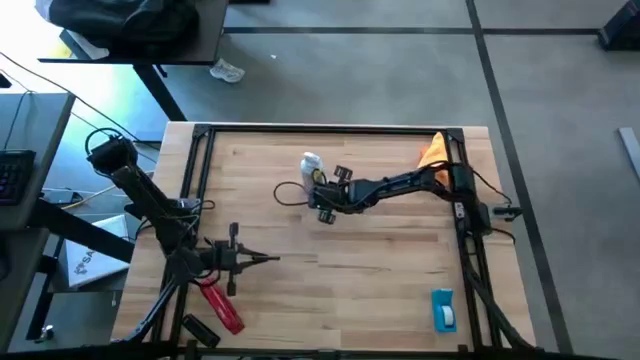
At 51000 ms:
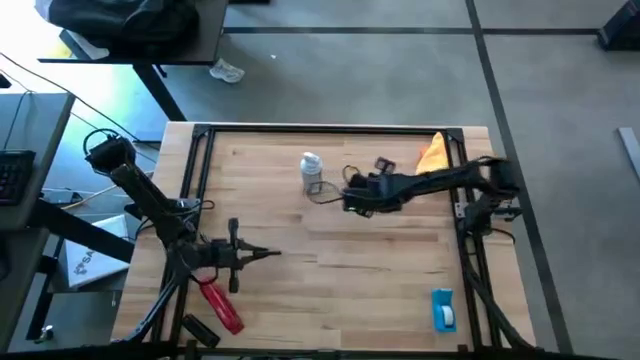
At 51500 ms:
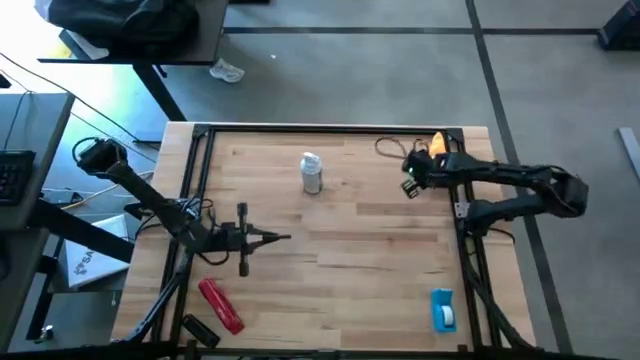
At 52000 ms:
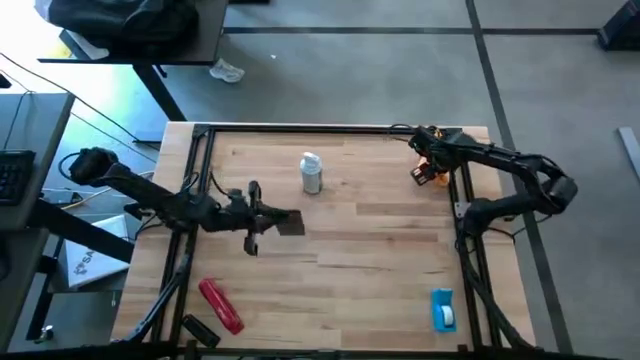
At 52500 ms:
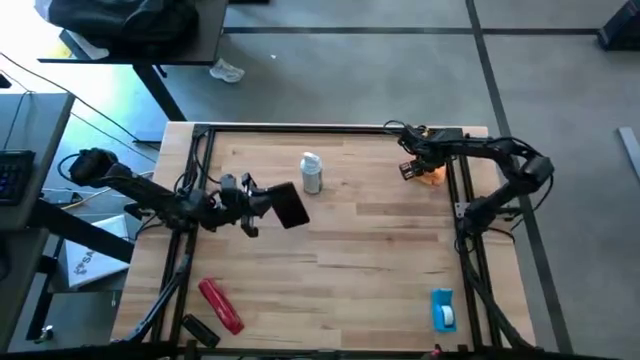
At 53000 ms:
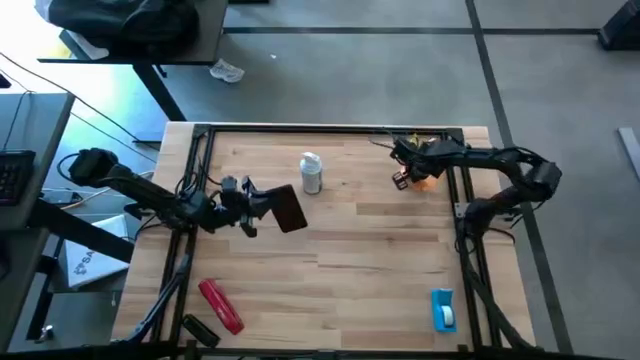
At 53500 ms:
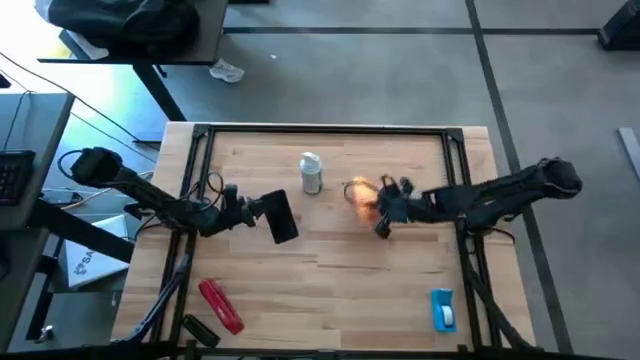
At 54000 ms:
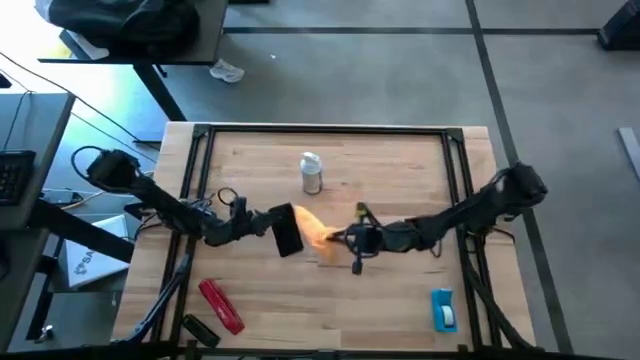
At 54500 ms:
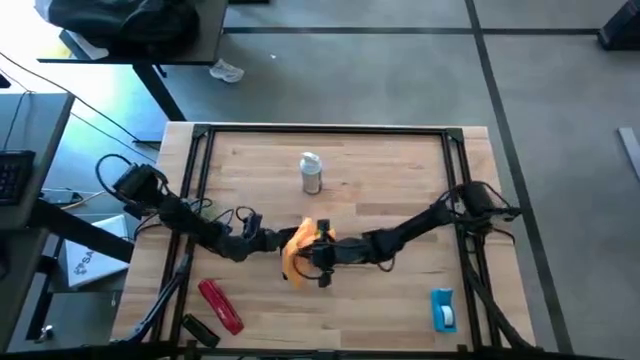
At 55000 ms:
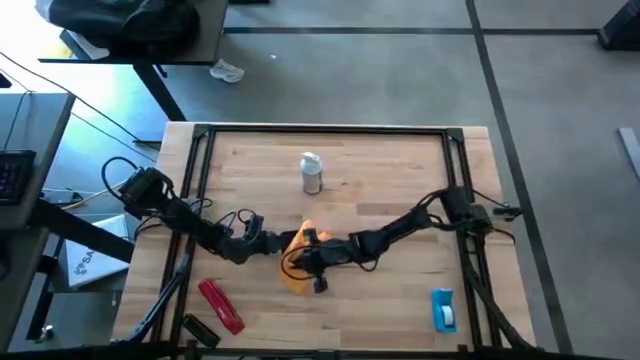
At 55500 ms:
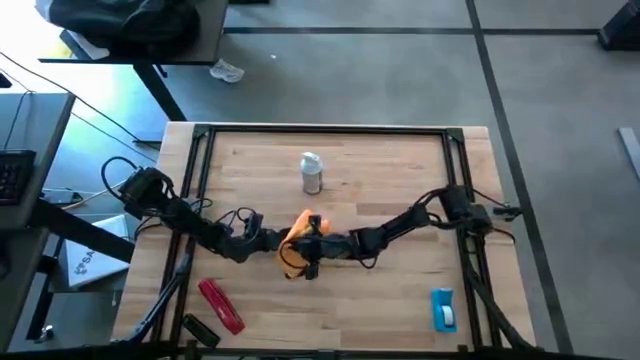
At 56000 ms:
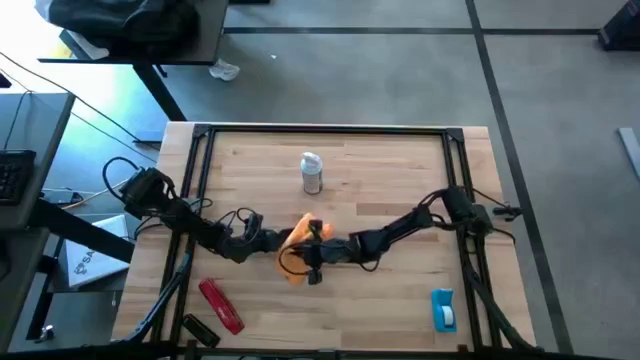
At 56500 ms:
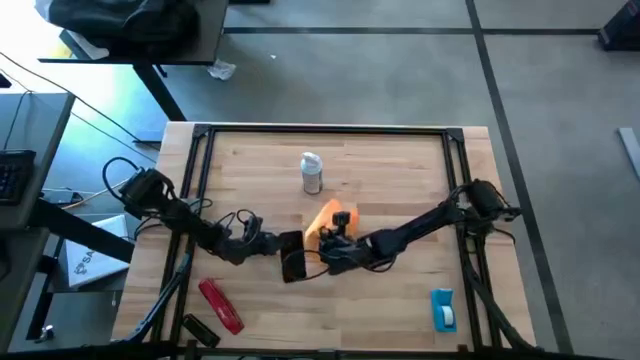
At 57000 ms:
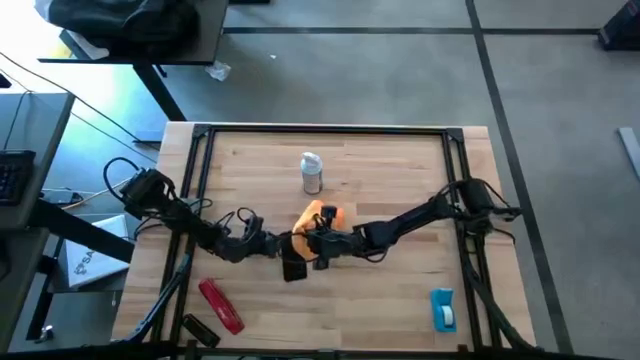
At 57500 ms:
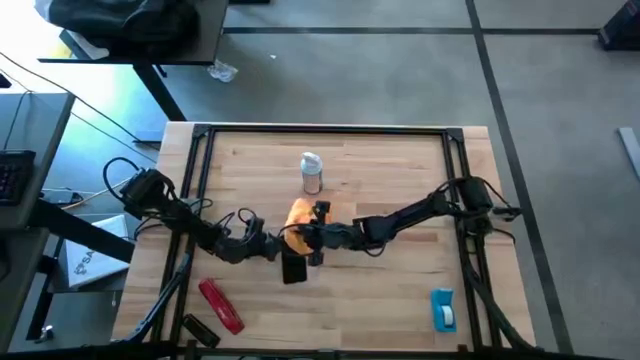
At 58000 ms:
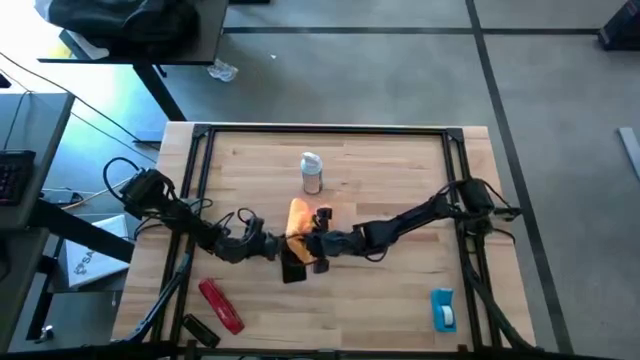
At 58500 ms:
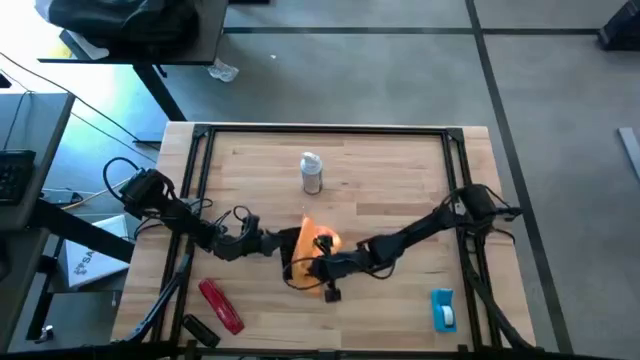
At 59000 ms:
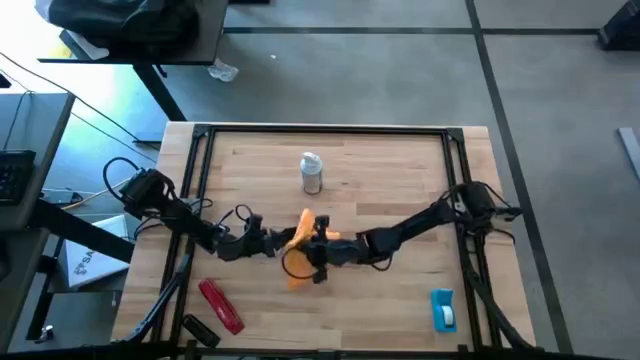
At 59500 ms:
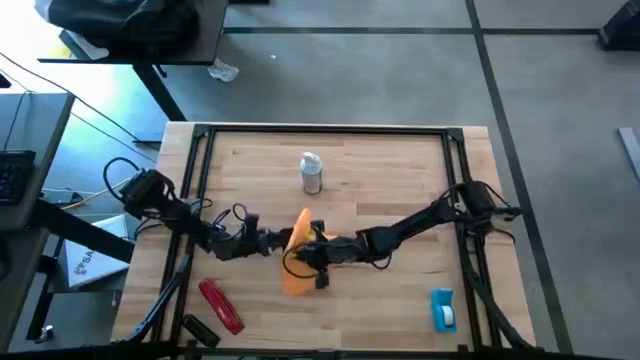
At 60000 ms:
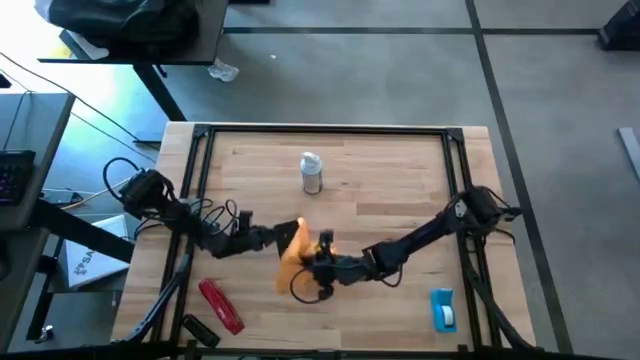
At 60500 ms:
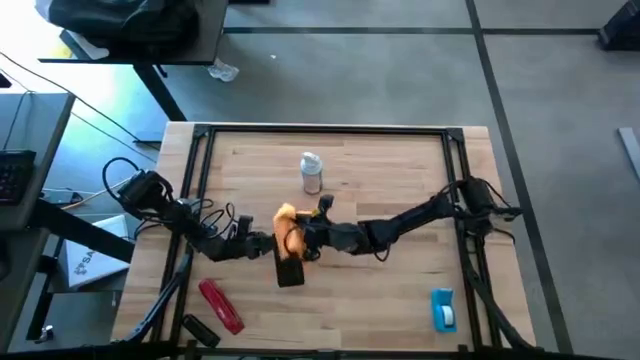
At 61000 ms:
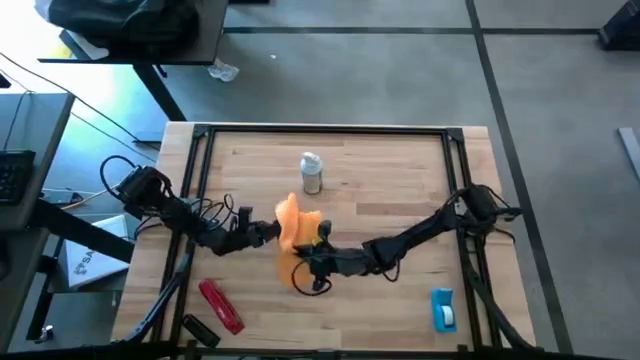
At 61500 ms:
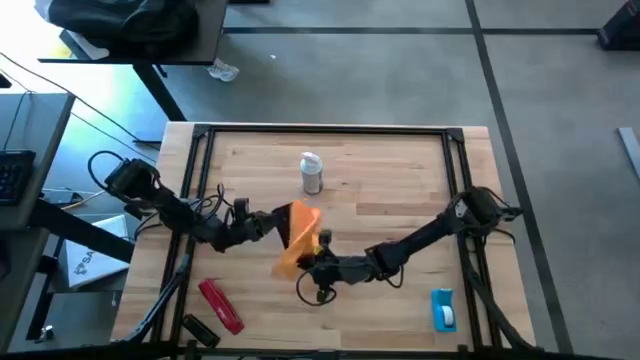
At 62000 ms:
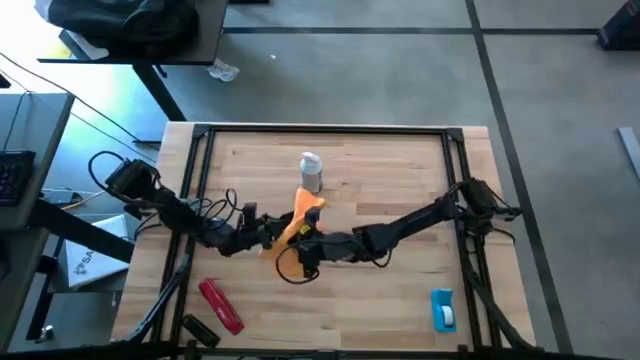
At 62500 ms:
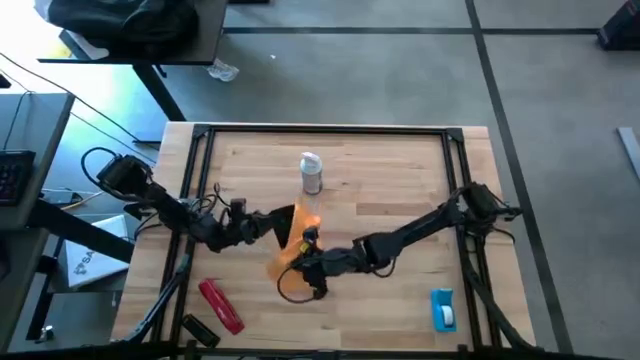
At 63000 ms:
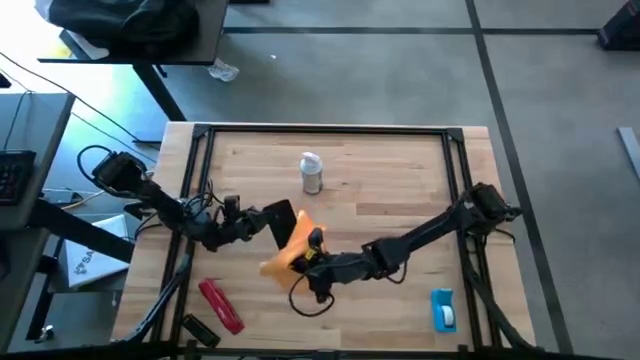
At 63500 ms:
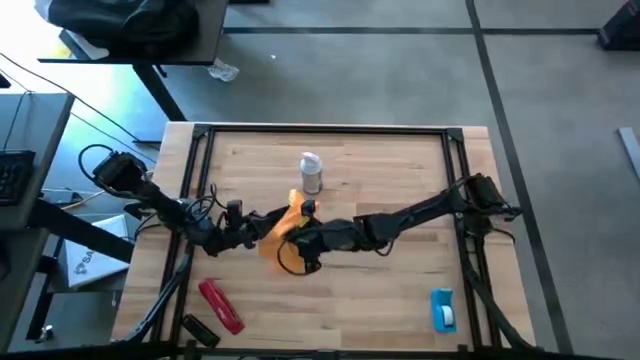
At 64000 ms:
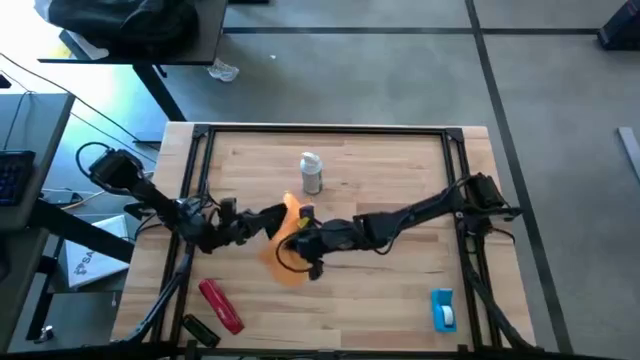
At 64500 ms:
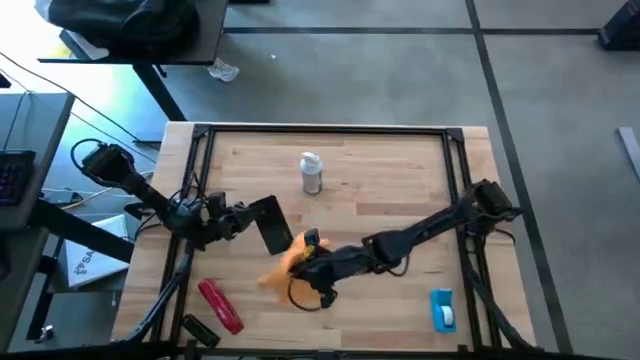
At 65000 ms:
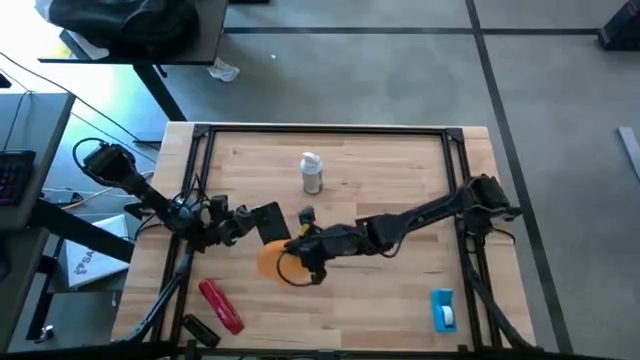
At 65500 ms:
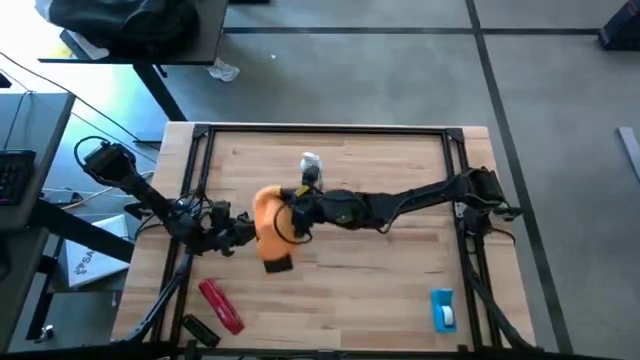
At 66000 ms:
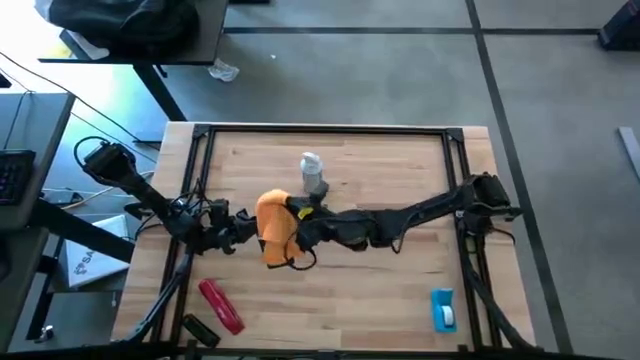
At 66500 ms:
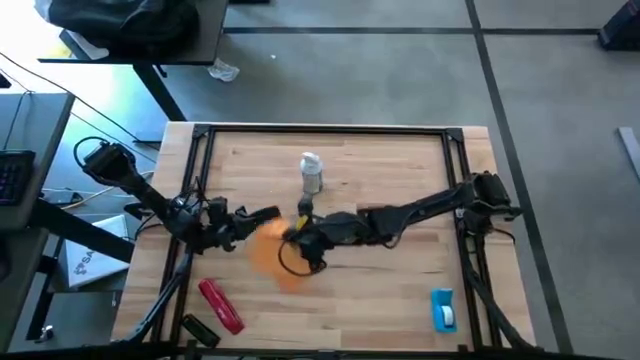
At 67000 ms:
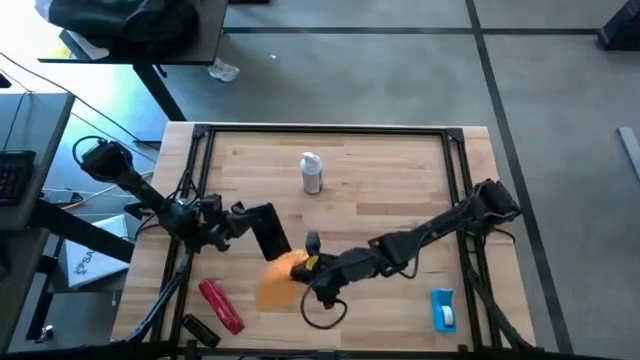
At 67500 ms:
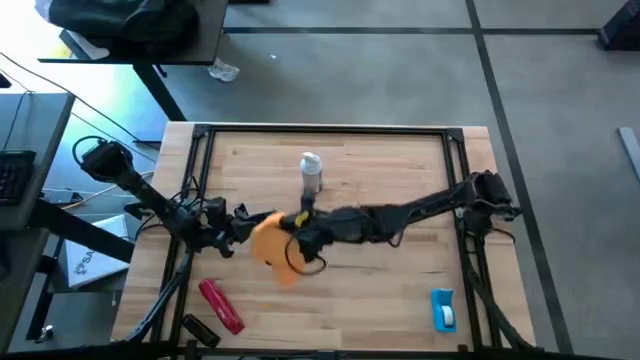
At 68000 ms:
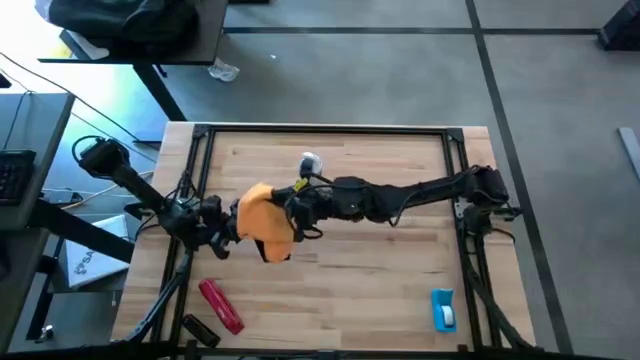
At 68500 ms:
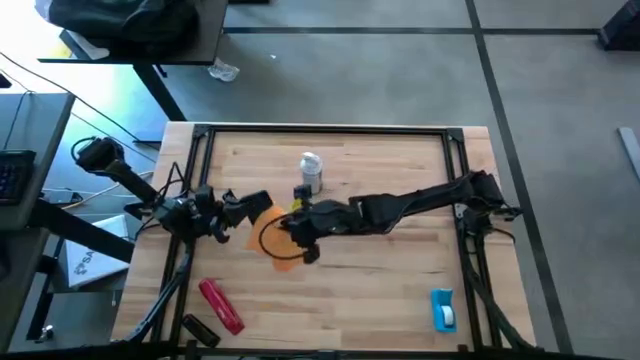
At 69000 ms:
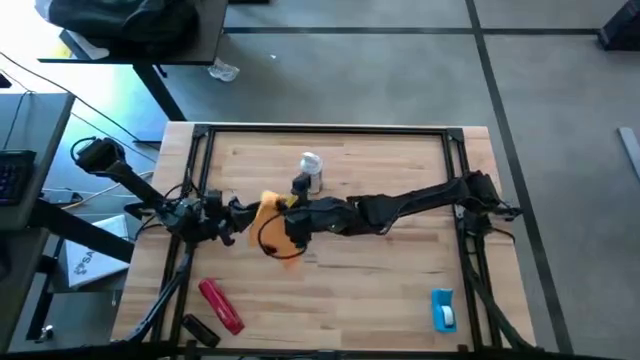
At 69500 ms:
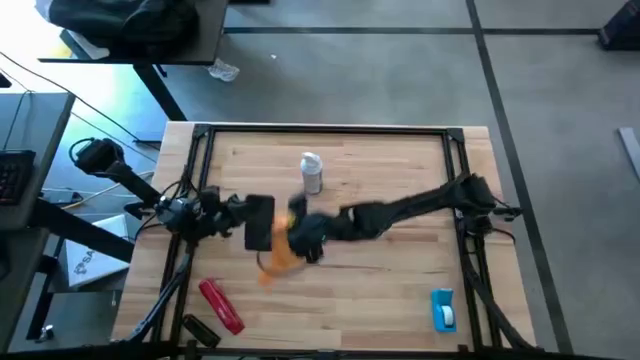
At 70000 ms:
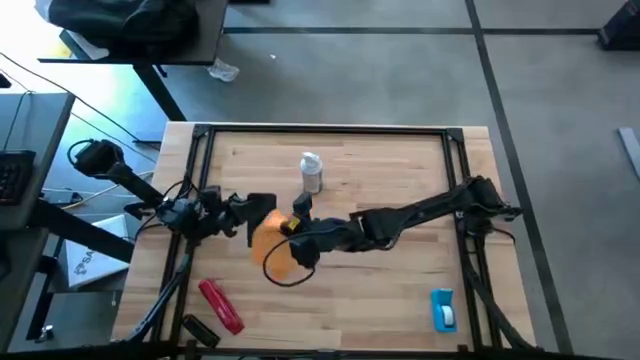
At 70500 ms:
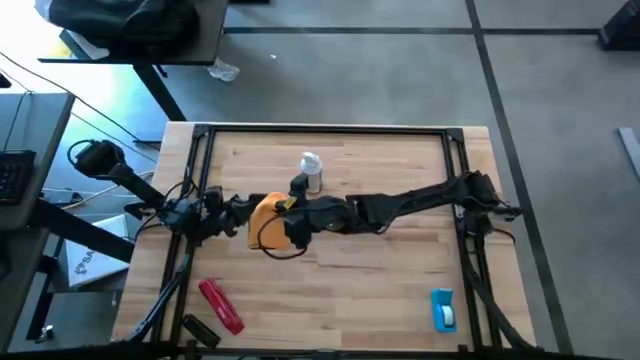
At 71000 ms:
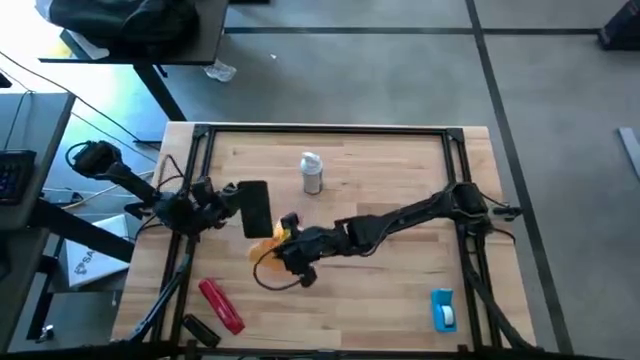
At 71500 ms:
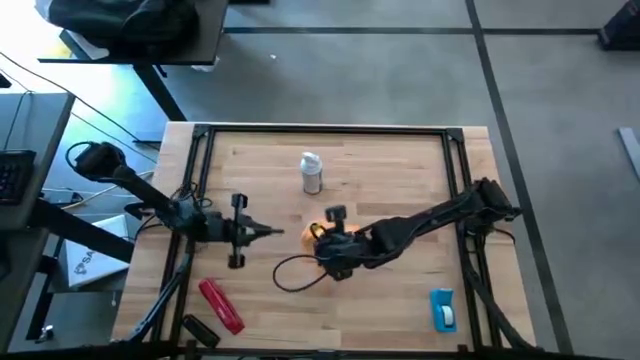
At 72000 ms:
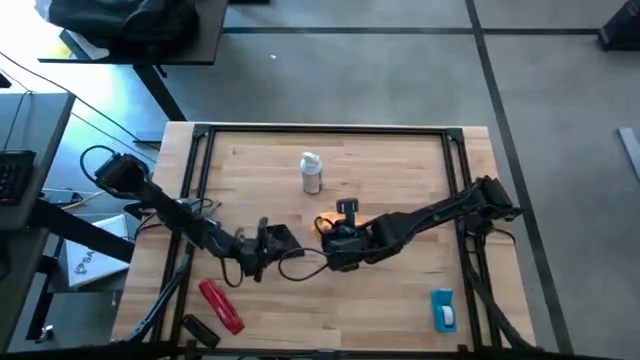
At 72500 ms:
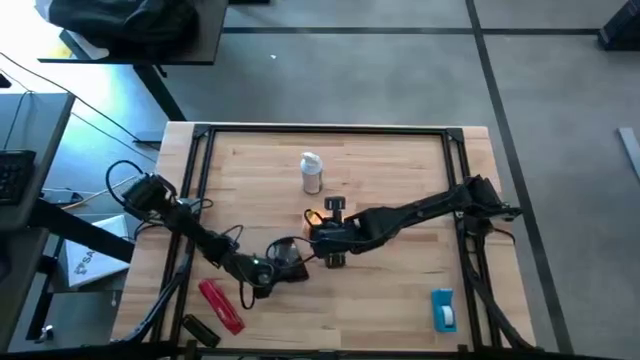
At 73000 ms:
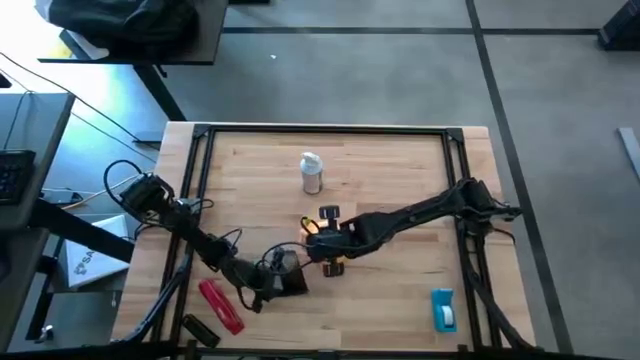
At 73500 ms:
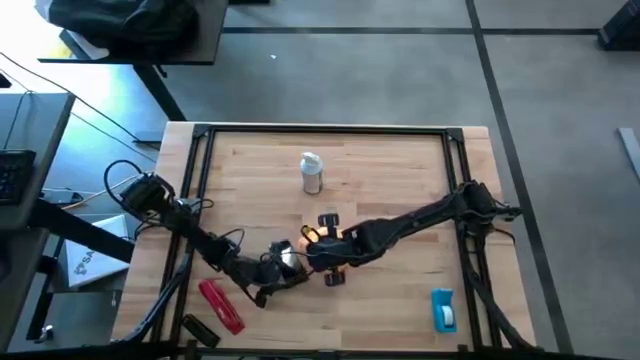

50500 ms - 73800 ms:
Task: Apply microfiber cloth
Wipe the front and back of the cellphone with the yellow microfiber cloth
